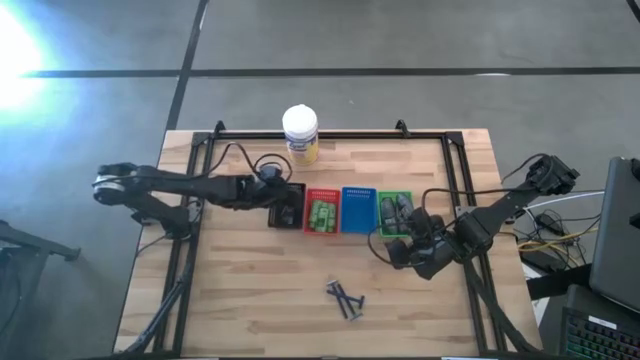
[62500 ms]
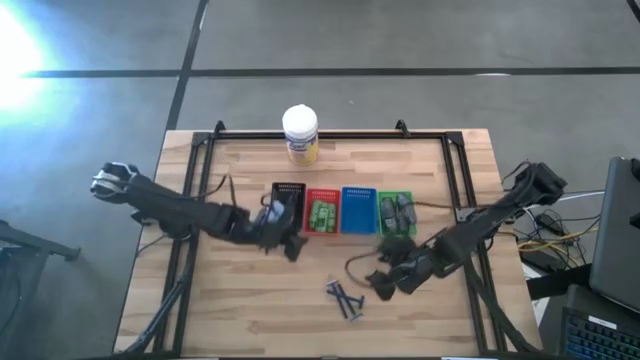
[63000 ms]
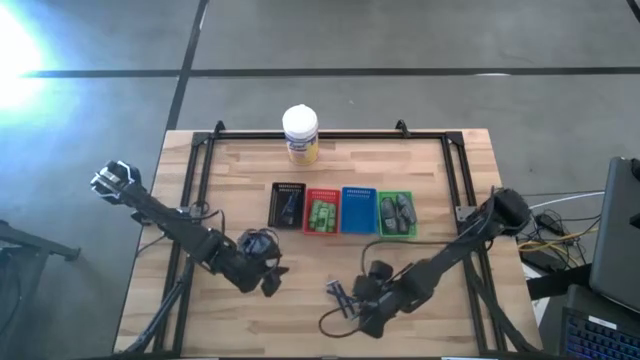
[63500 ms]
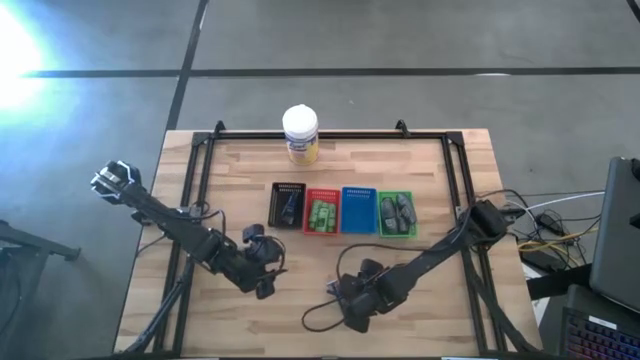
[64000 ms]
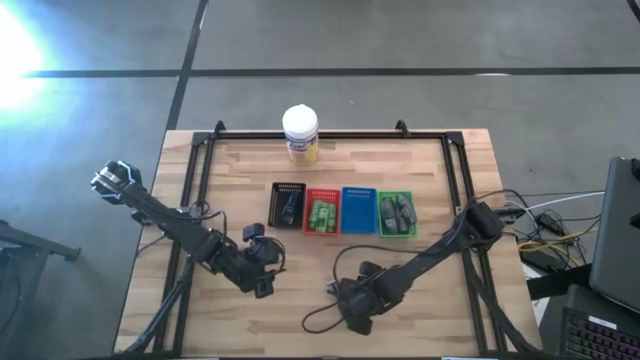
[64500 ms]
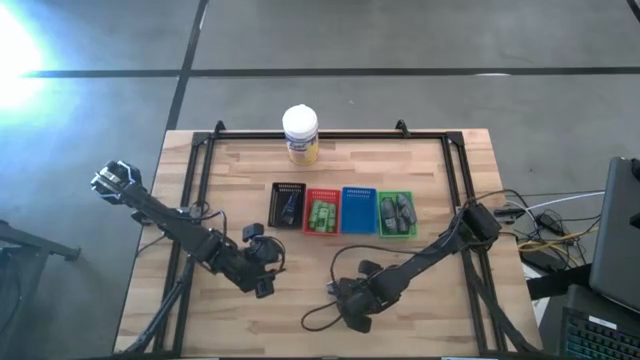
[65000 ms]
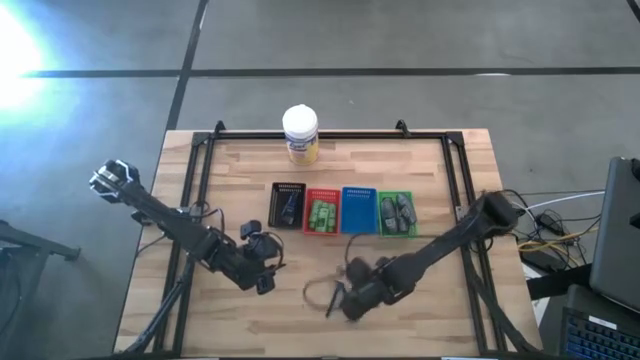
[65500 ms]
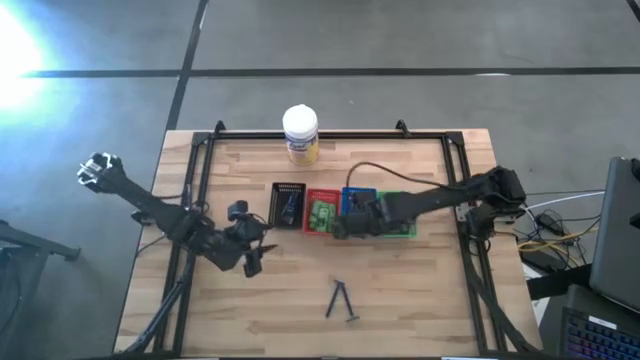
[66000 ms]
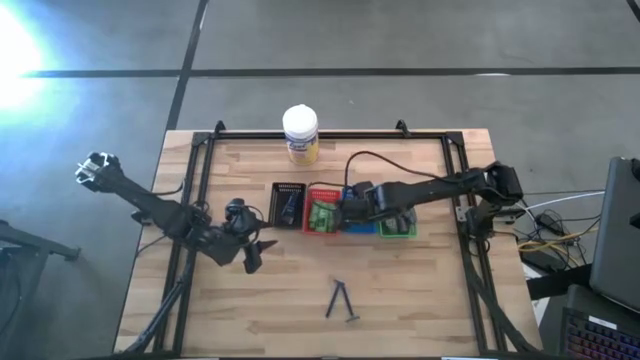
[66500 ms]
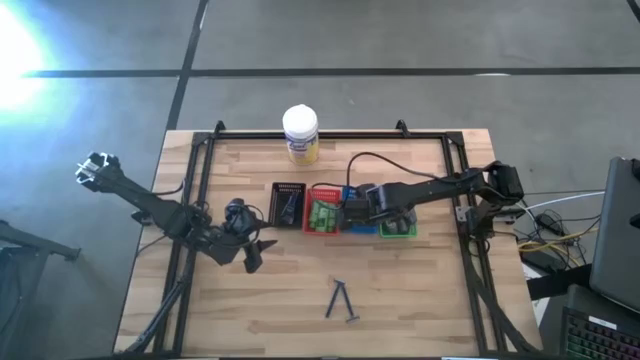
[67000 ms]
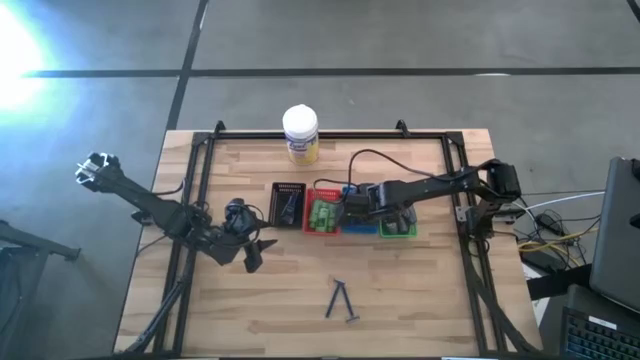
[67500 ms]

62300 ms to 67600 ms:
Task: Pick & Place Travel size toiletries
Put the blue razor into the blue basket

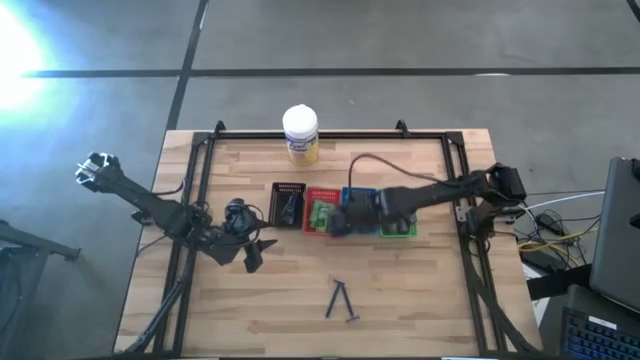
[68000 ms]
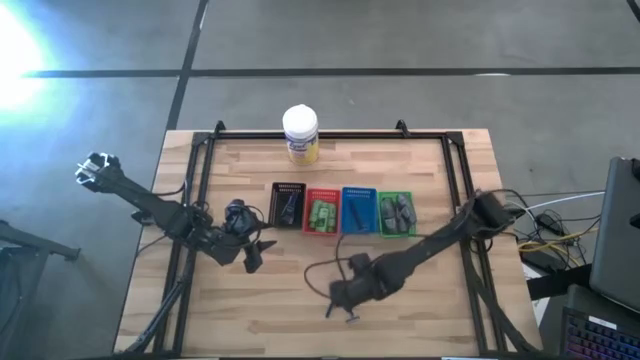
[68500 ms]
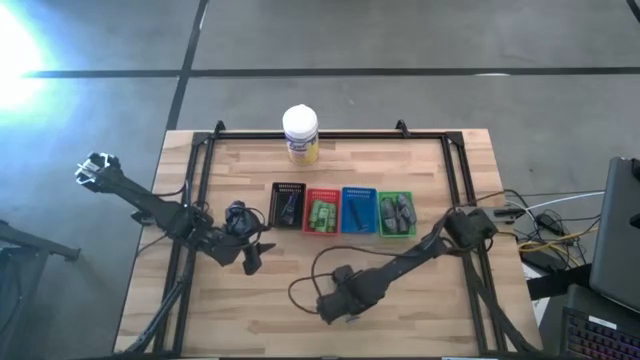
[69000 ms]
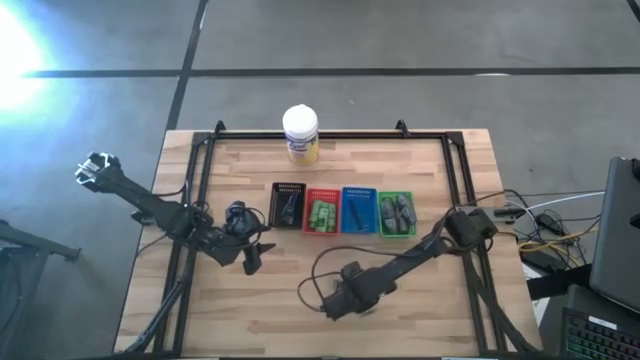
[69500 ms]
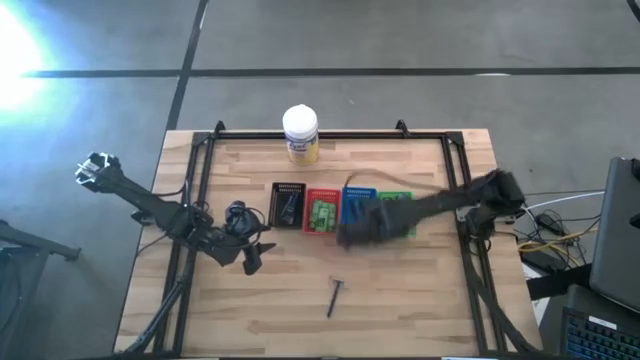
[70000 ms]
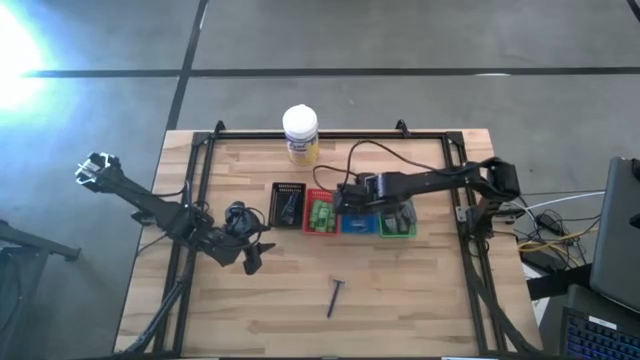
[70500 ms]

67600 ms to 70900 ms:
Put the blue razor into the blue basket

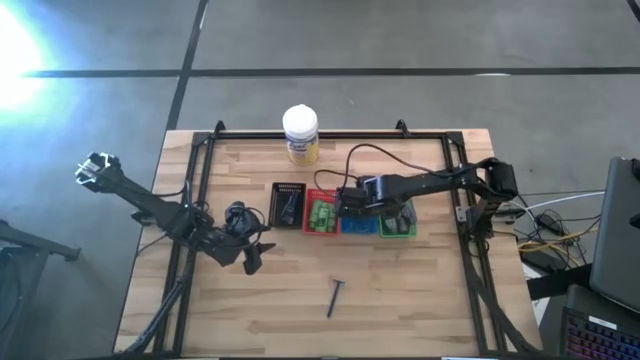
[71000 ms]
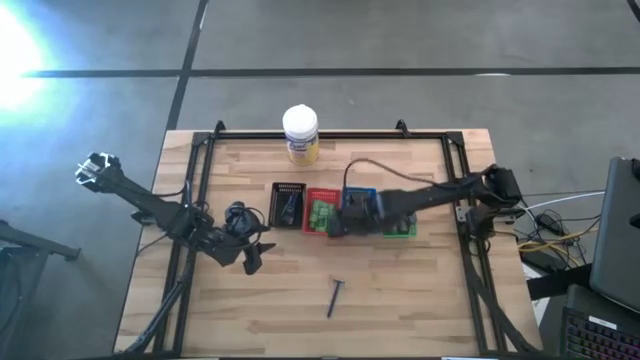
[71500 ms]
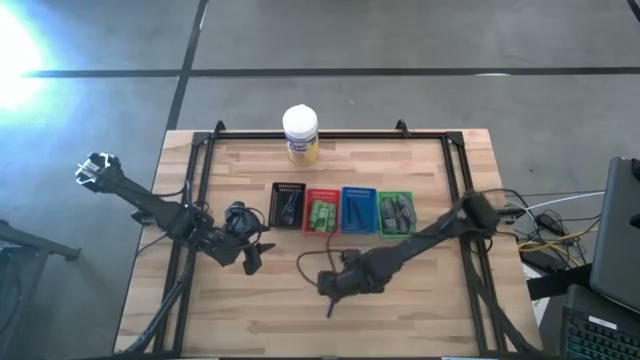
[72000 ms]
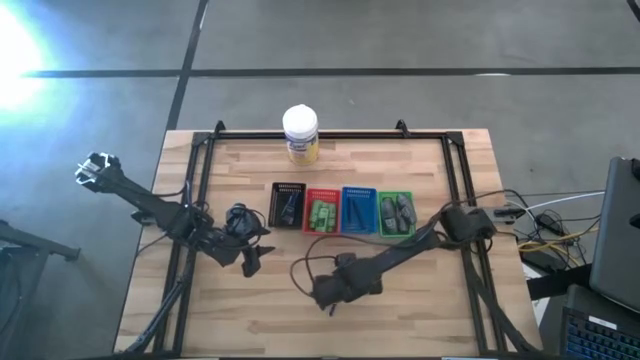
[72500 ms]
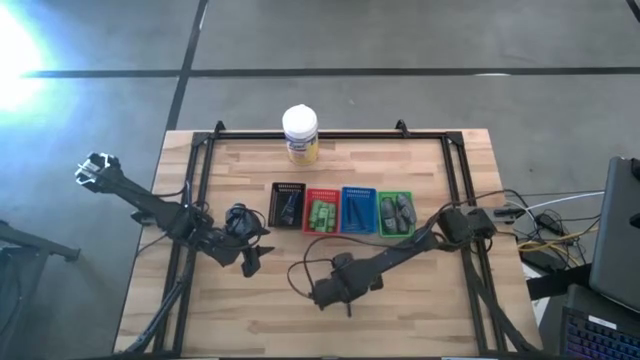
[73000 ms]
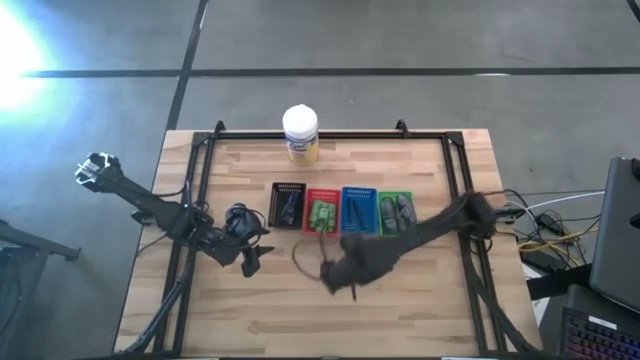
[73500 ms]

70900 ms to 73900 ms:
Put the blue razor into the blue basket

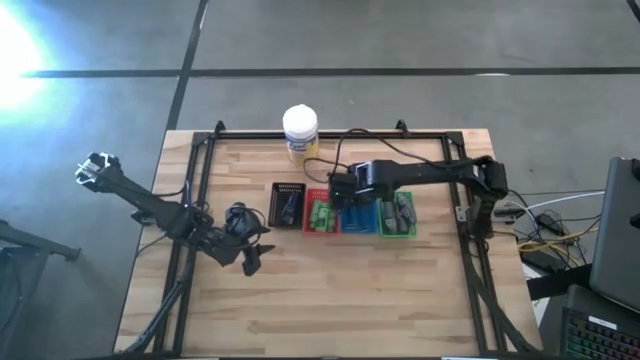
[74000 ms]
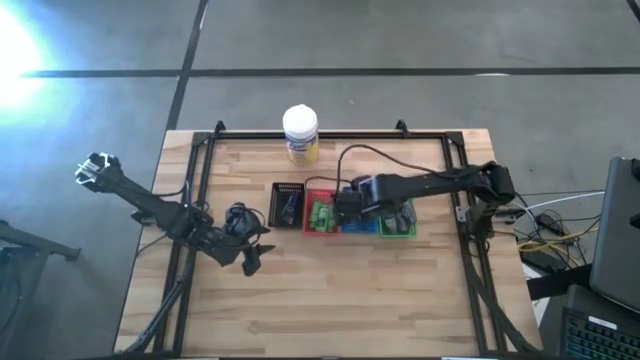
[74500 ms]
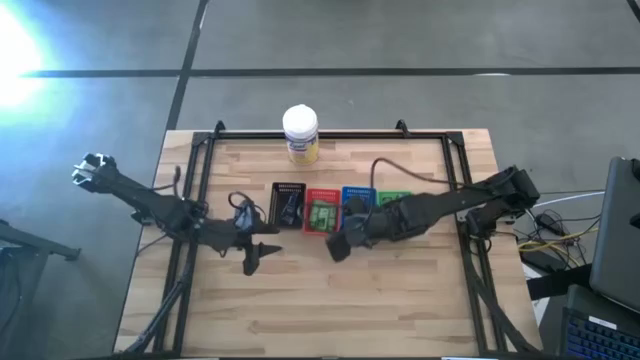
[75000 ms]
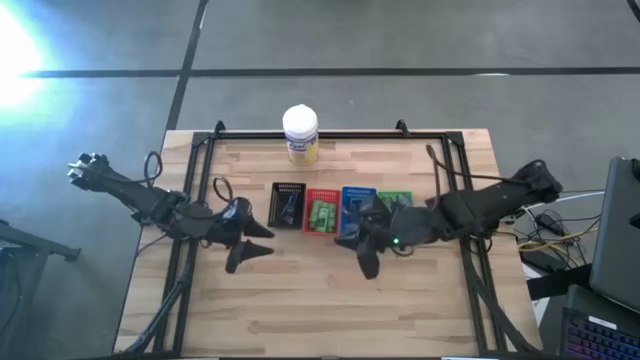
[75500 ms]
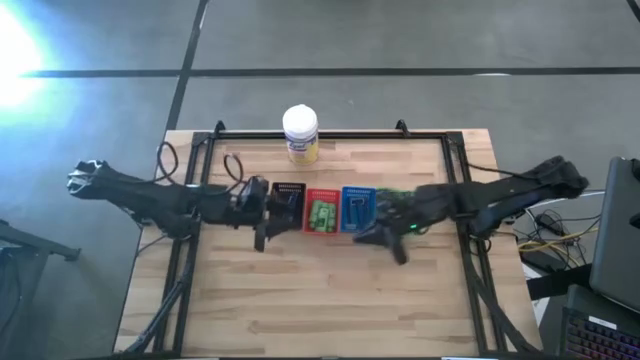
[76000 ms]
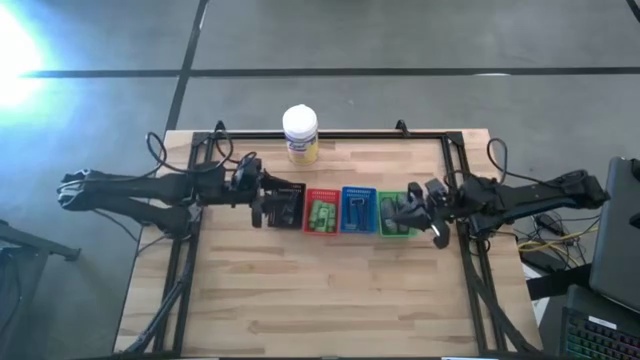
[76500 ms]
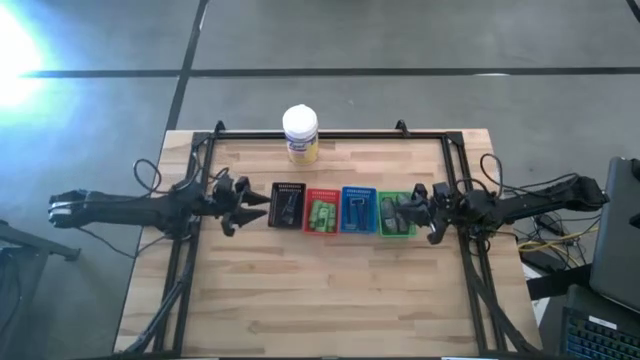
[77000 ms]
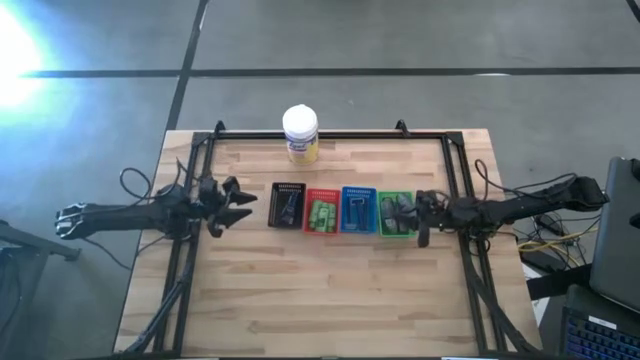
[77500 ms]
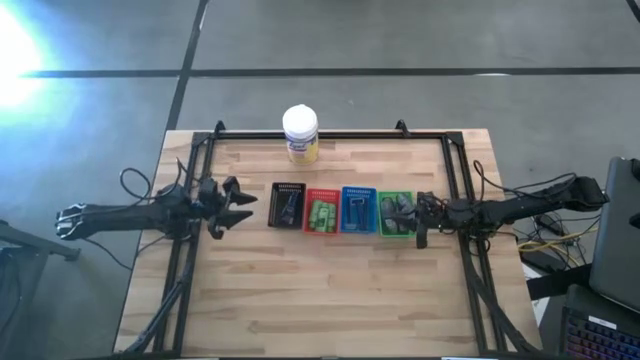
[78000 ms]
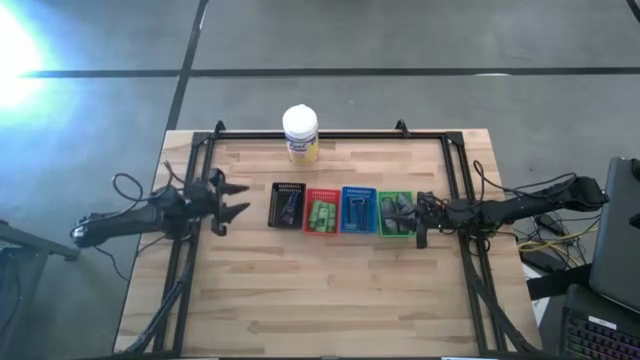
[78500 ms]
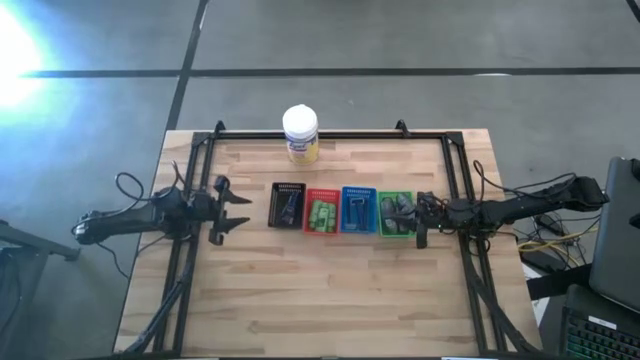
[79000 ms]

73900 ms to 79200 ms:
Return to Home Position

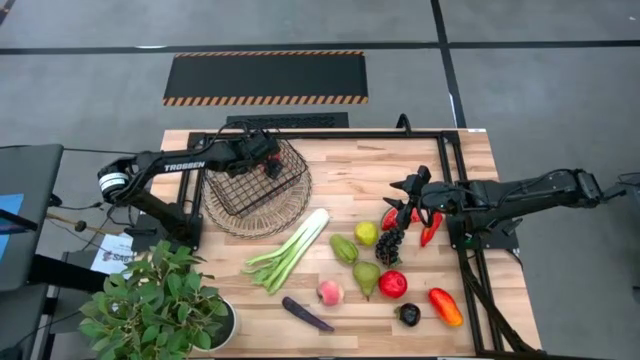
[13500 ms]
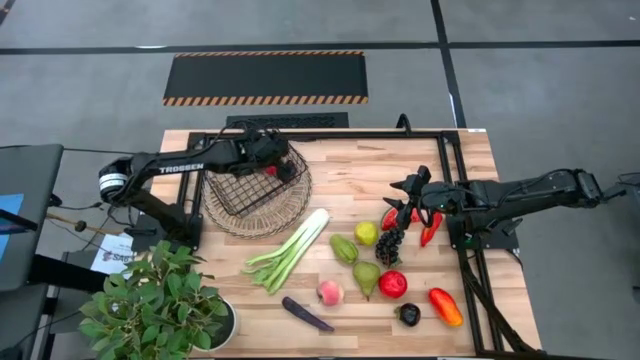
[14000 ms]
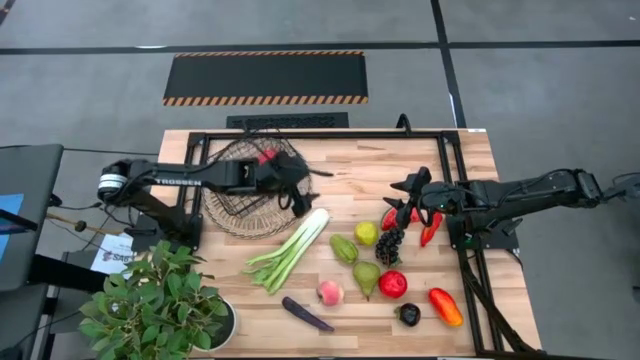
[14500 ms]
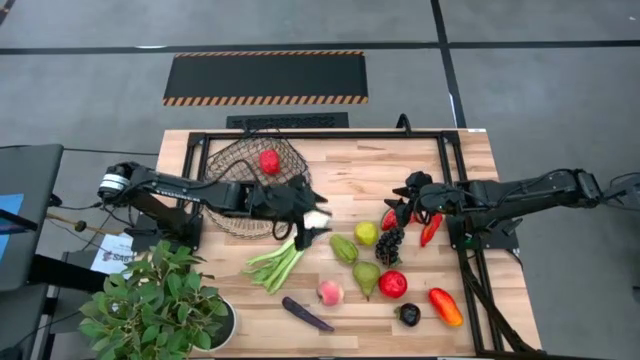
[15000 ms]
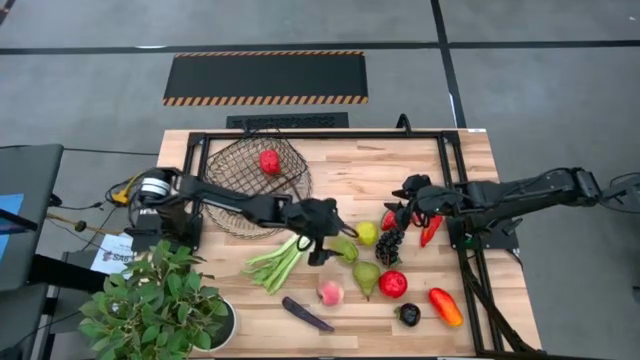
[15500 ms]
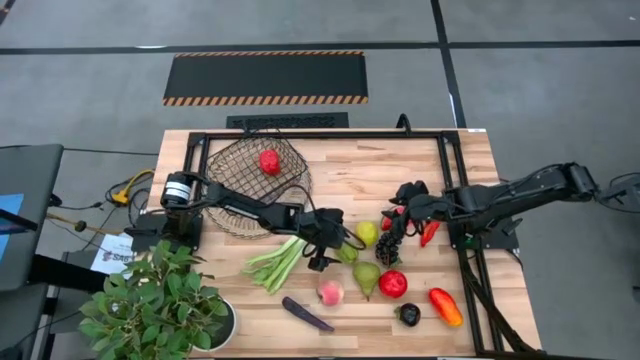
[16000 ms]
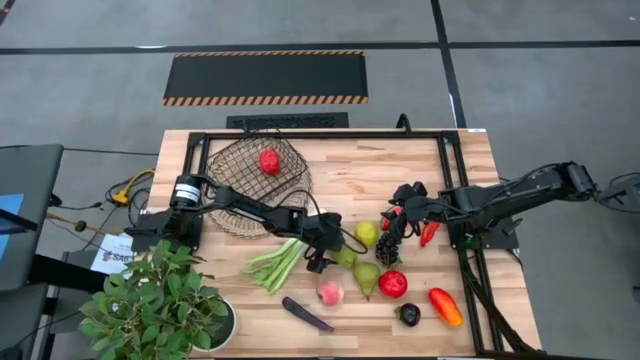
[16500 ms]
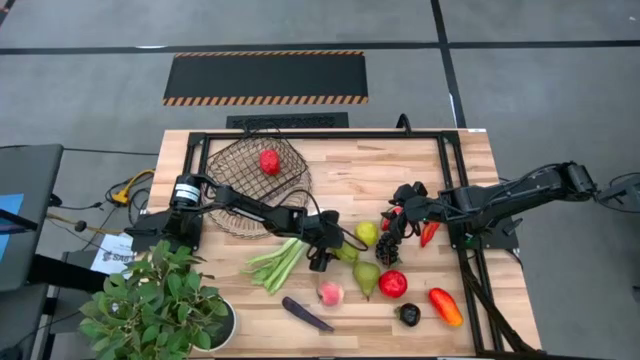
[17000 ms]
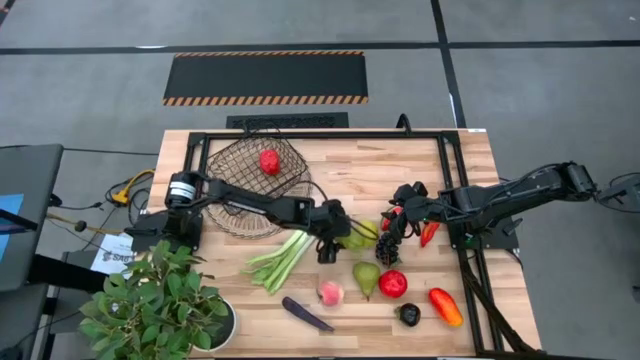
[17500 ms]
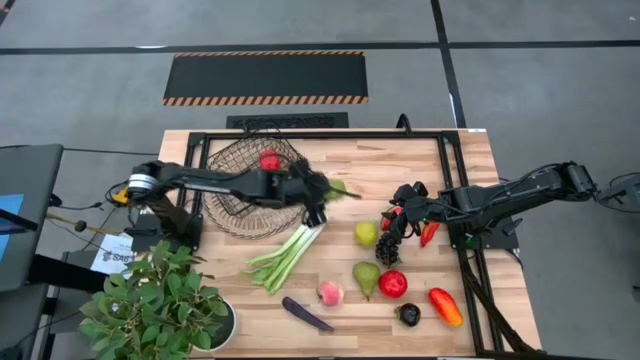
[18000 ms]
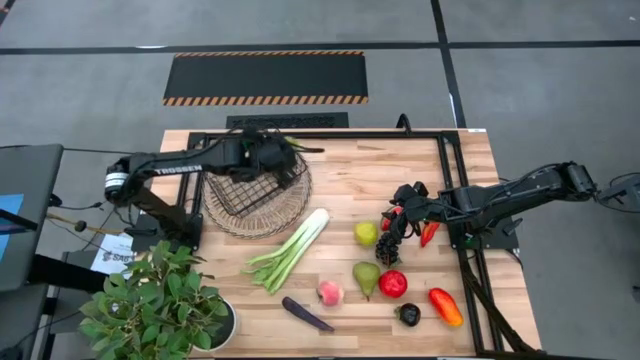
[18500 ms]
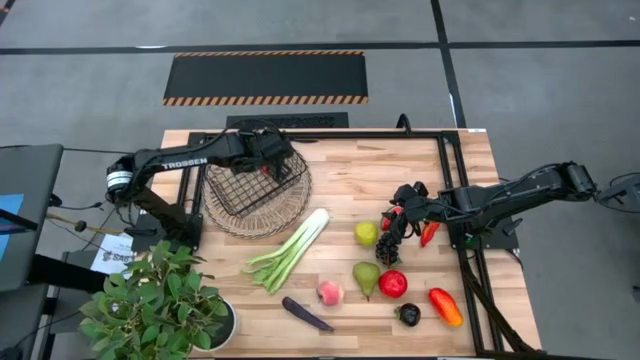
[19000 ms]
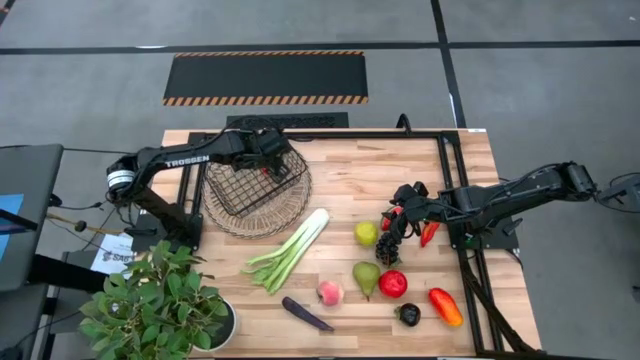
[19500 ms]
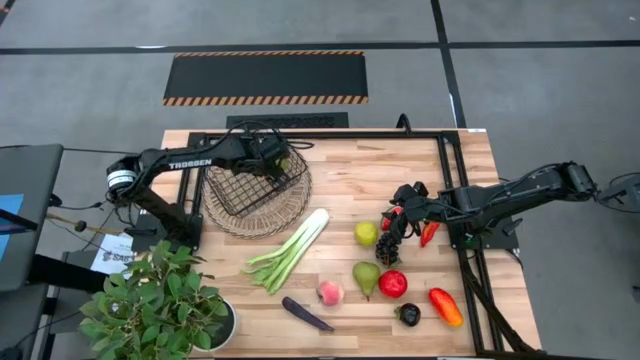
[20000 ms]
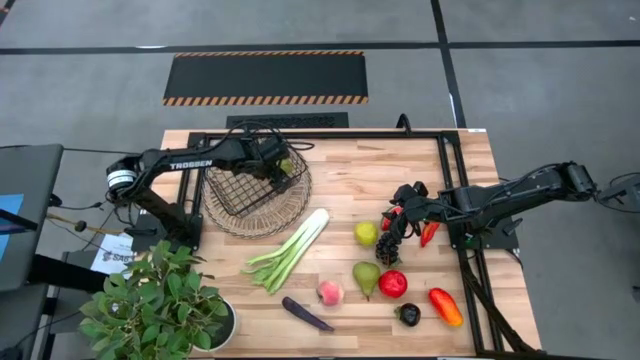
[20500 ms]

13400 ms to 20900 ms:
Task: Build produce basket
Put the green chayote into the wire basket
